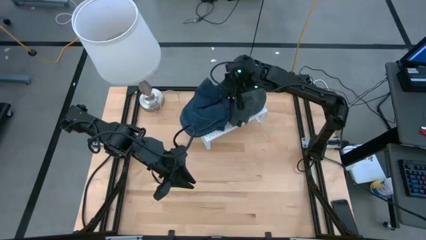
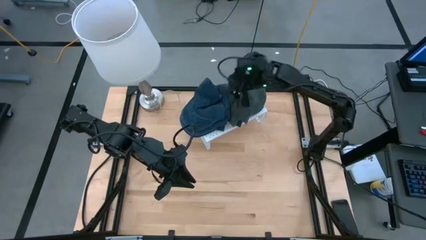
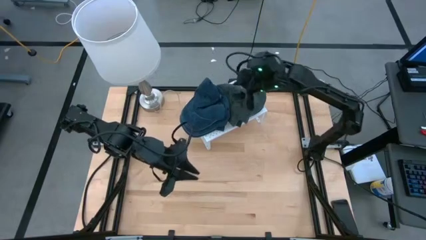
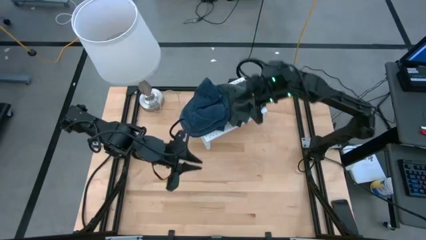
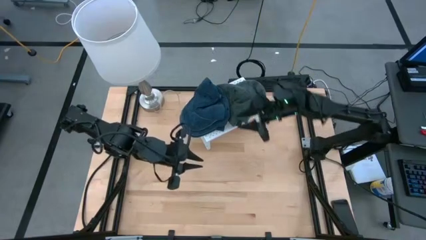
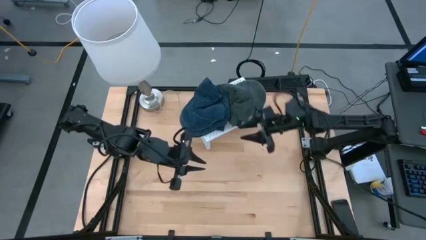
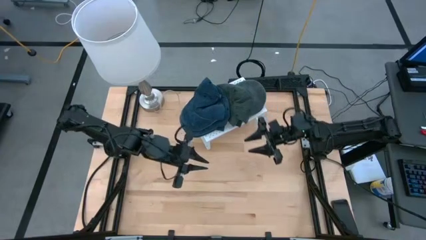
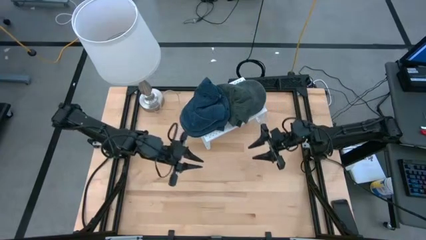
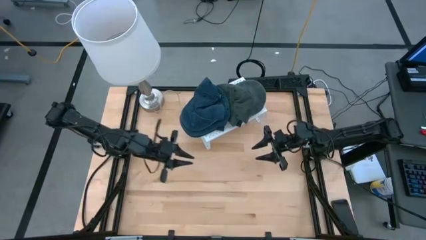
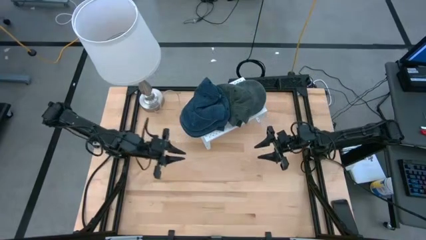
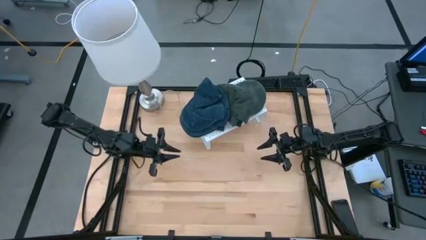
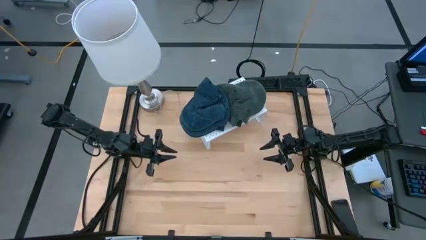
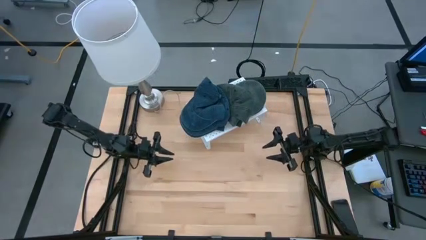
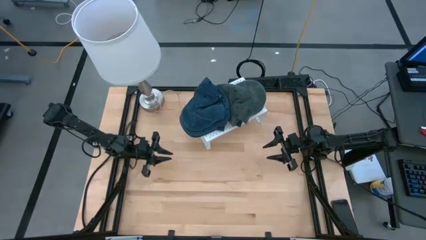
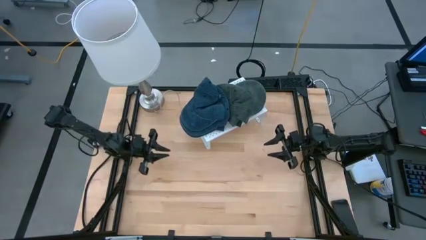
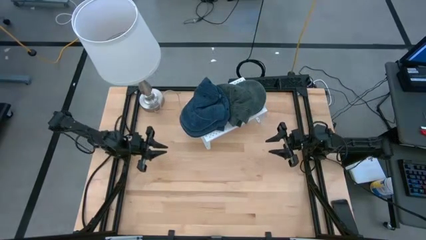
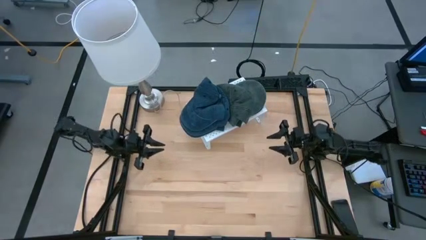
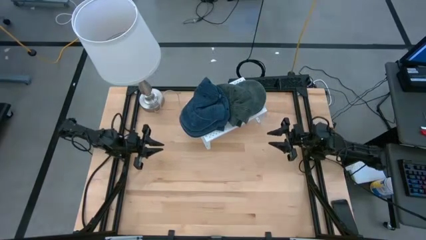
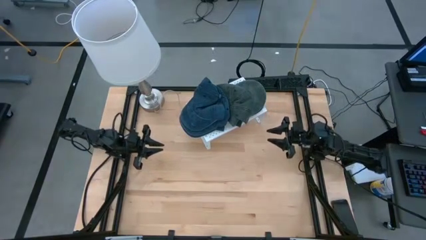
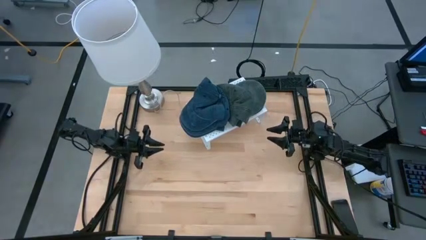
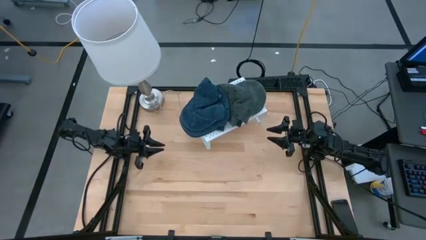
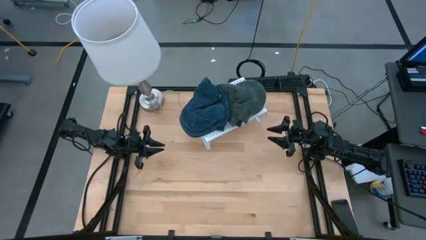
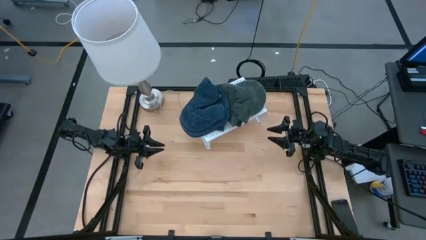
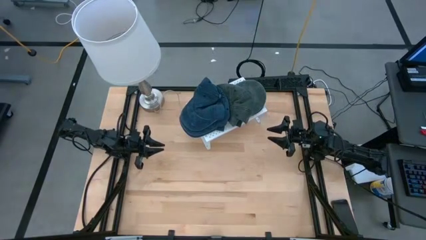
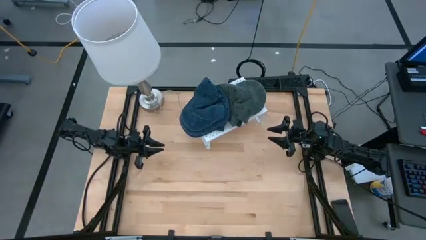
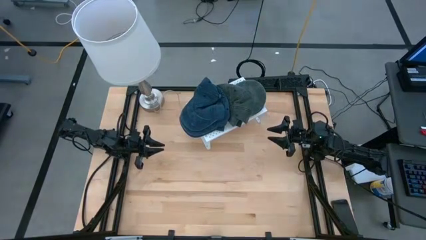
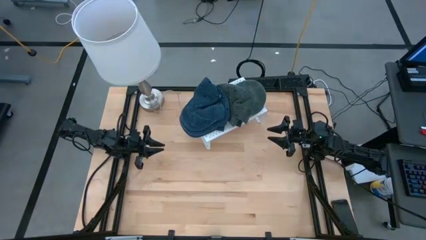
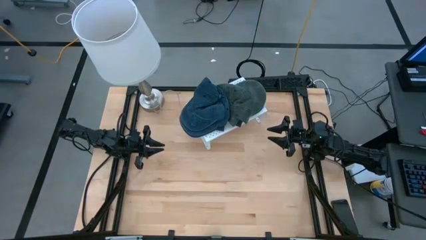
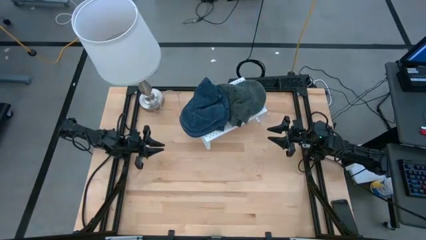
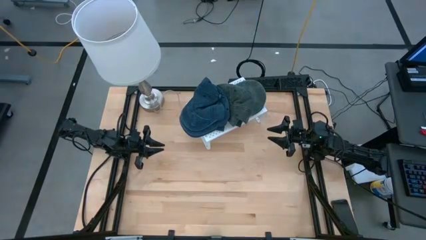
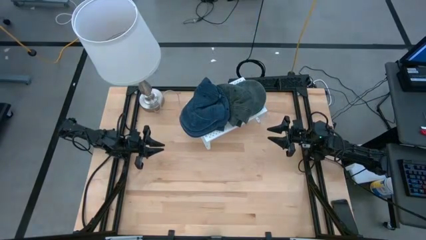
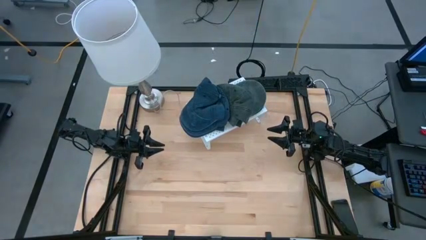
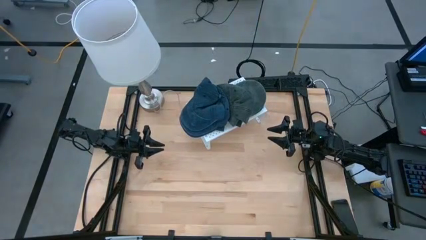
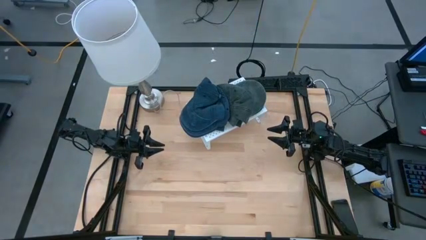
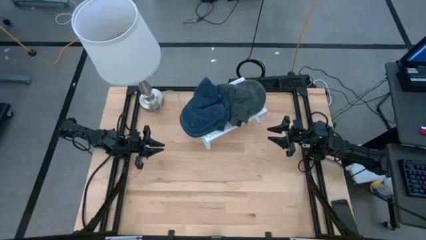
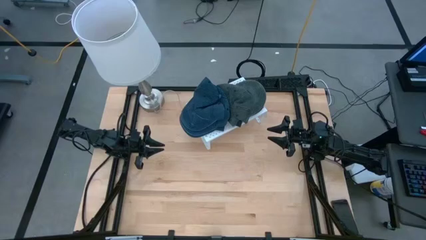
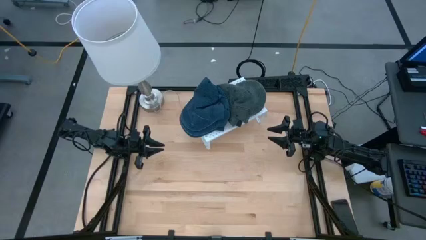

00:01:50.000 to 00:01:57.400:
Task: Pick & Place hat
Return to Home Position
